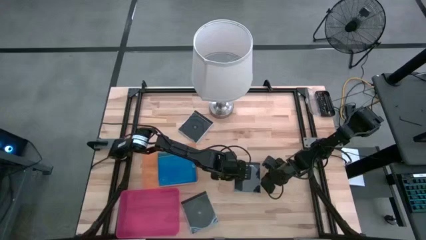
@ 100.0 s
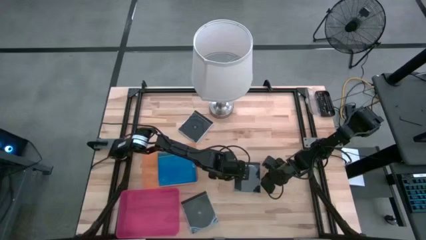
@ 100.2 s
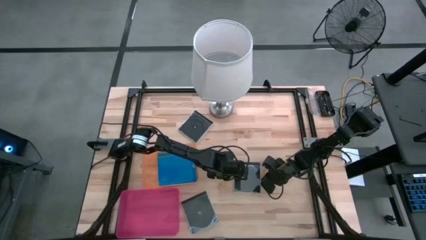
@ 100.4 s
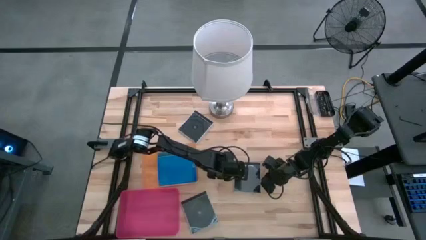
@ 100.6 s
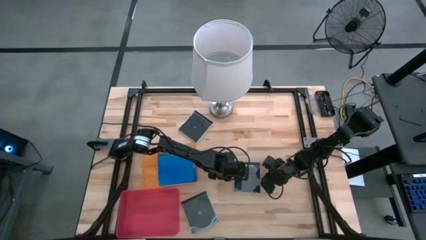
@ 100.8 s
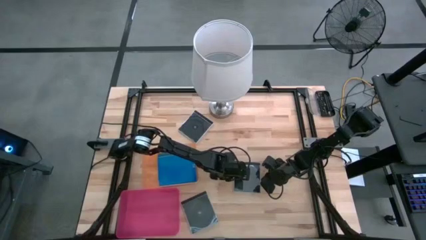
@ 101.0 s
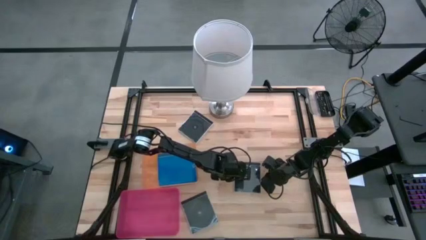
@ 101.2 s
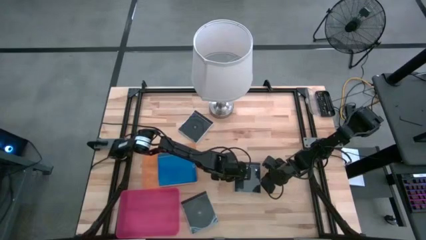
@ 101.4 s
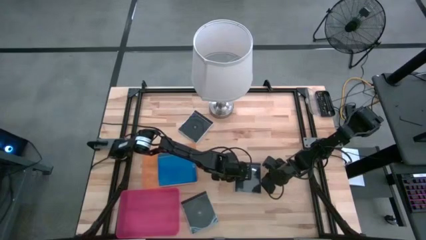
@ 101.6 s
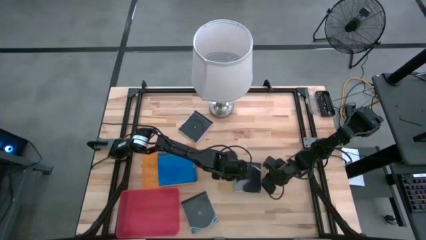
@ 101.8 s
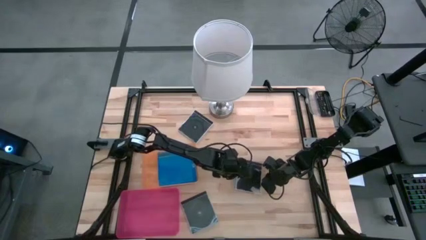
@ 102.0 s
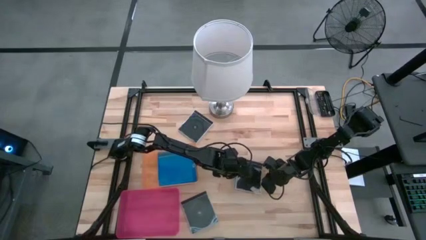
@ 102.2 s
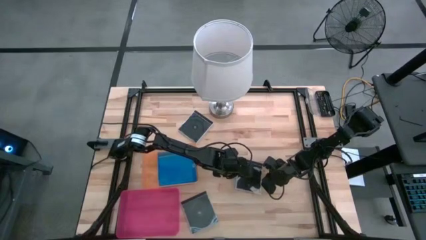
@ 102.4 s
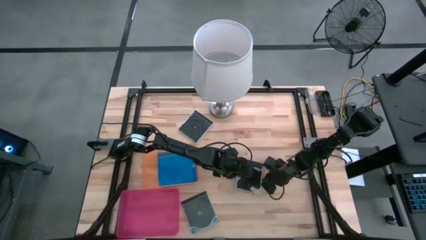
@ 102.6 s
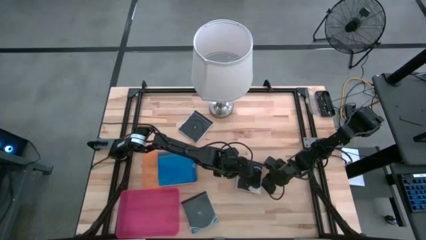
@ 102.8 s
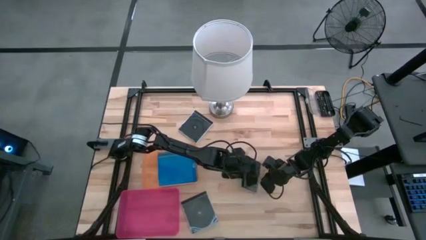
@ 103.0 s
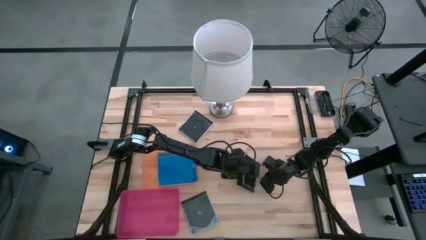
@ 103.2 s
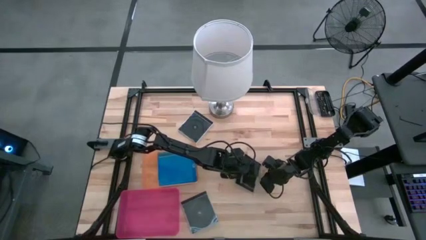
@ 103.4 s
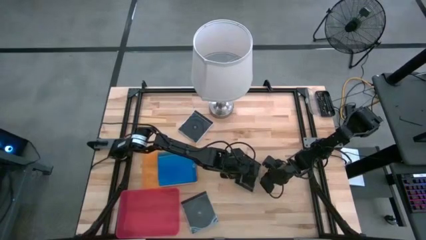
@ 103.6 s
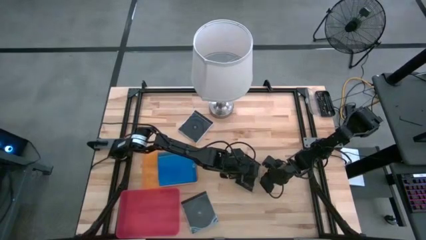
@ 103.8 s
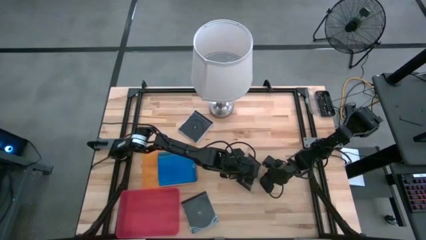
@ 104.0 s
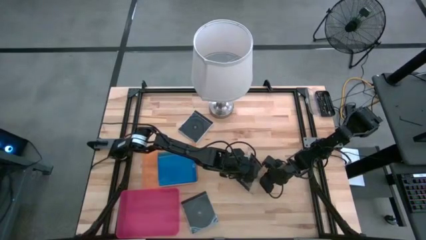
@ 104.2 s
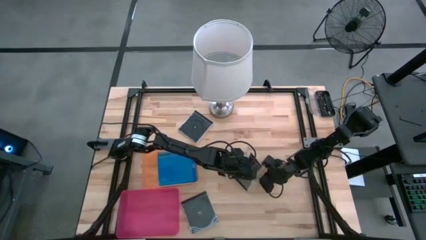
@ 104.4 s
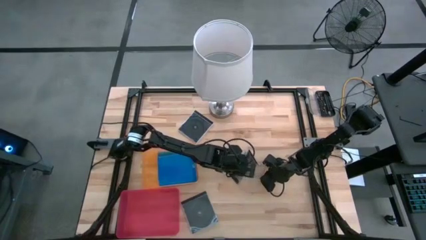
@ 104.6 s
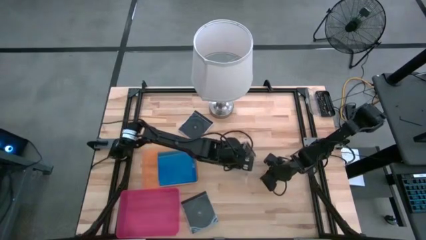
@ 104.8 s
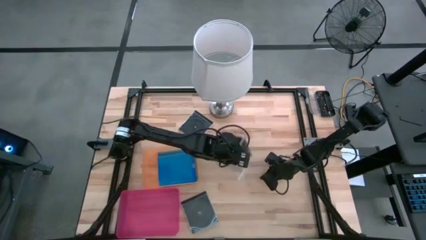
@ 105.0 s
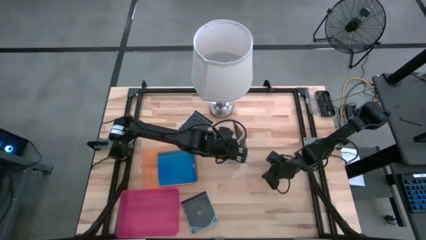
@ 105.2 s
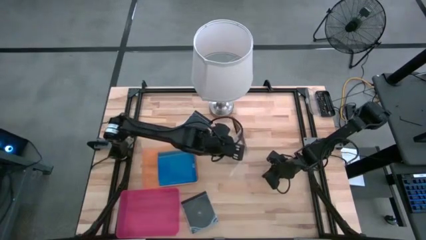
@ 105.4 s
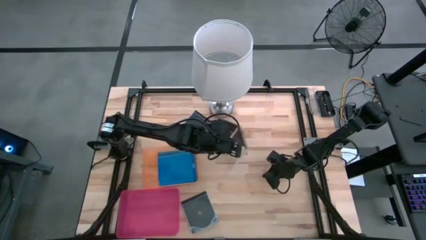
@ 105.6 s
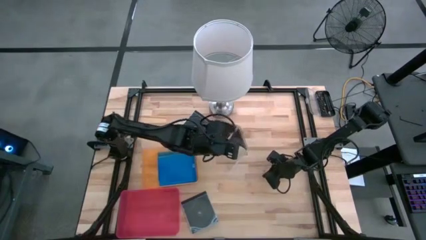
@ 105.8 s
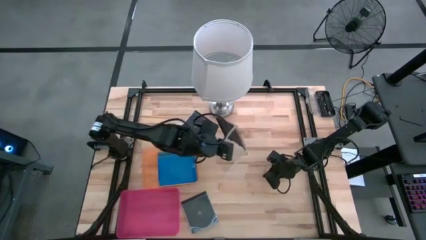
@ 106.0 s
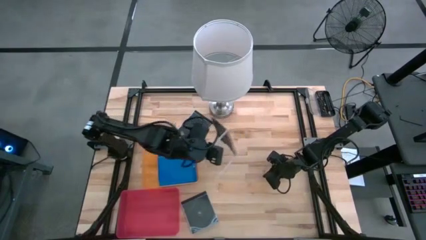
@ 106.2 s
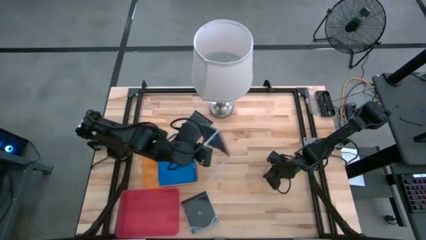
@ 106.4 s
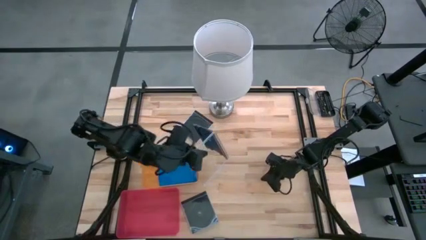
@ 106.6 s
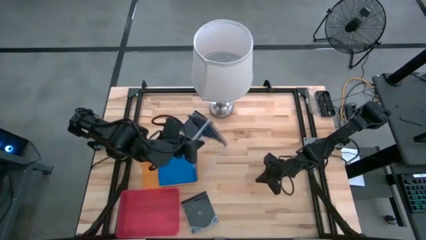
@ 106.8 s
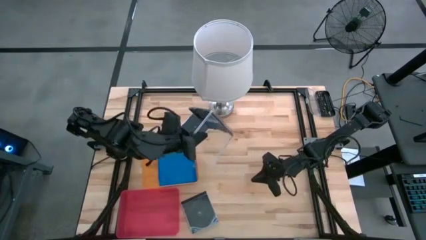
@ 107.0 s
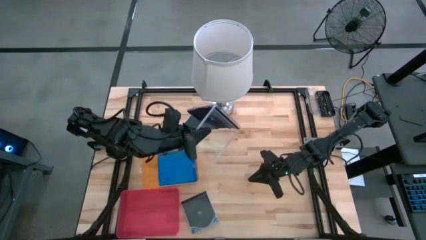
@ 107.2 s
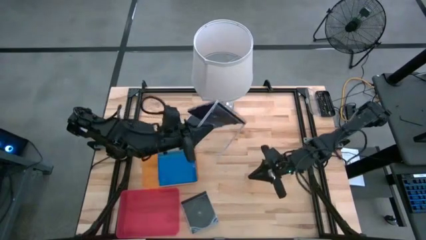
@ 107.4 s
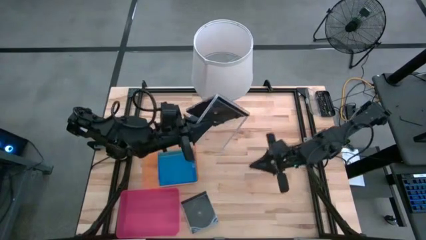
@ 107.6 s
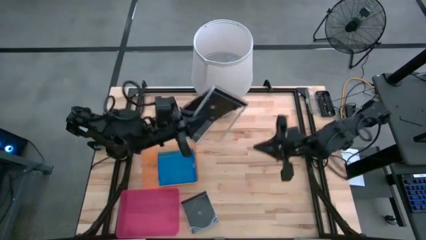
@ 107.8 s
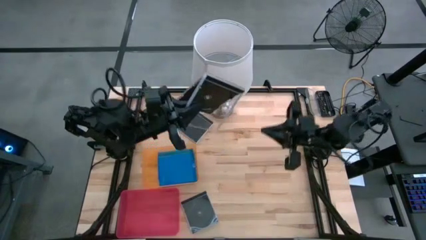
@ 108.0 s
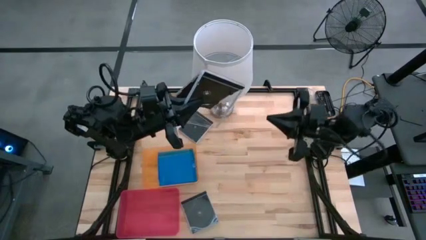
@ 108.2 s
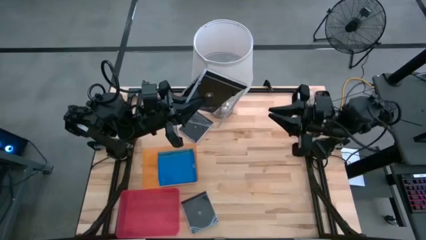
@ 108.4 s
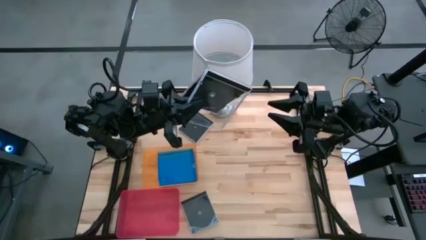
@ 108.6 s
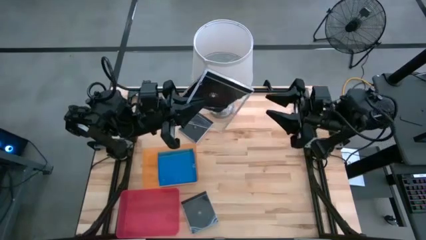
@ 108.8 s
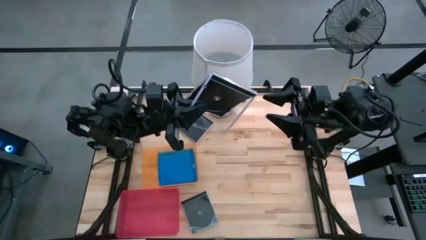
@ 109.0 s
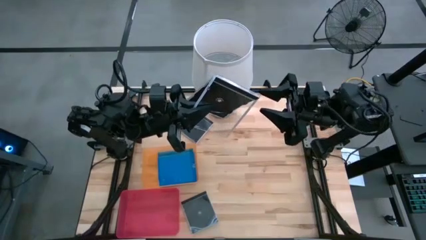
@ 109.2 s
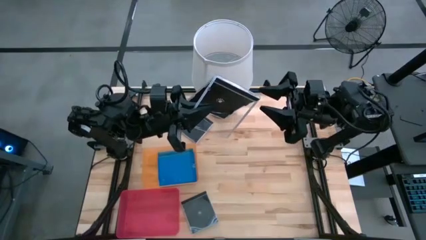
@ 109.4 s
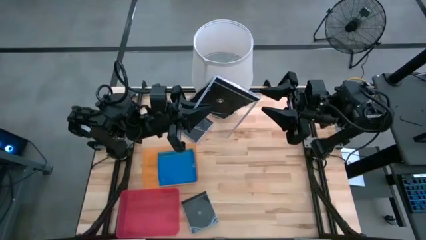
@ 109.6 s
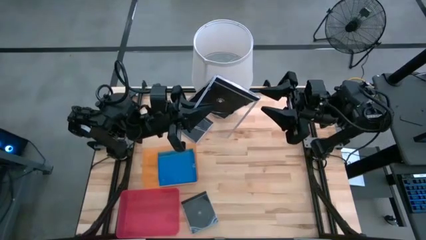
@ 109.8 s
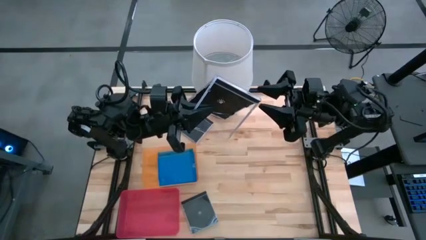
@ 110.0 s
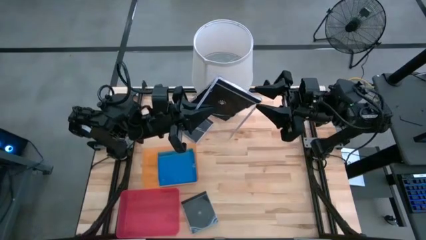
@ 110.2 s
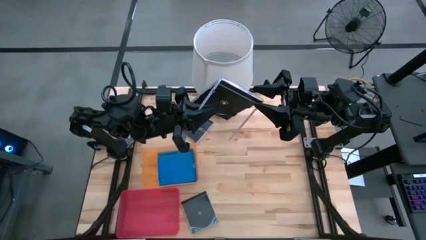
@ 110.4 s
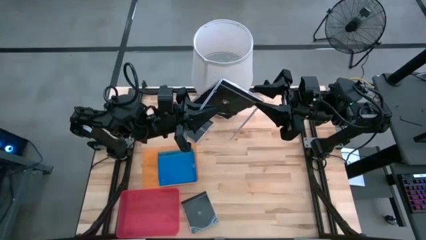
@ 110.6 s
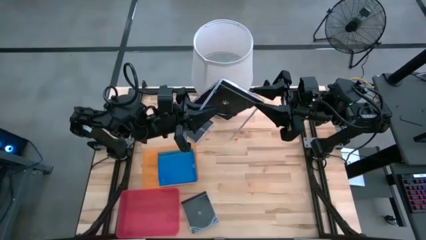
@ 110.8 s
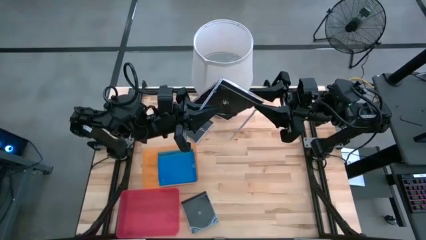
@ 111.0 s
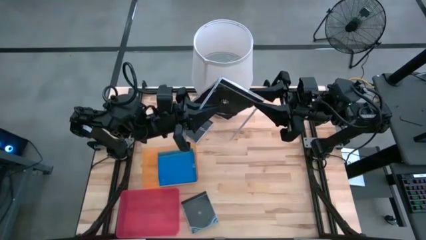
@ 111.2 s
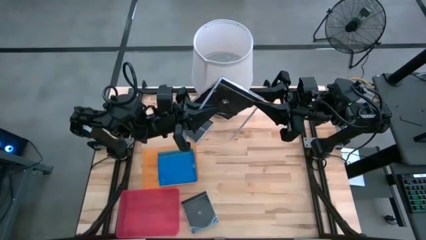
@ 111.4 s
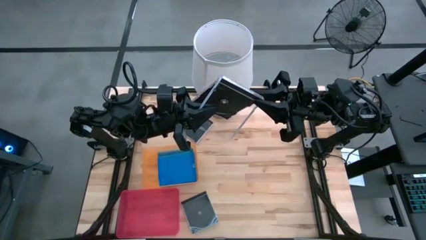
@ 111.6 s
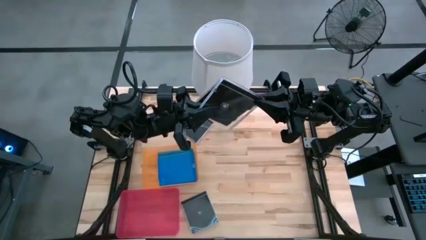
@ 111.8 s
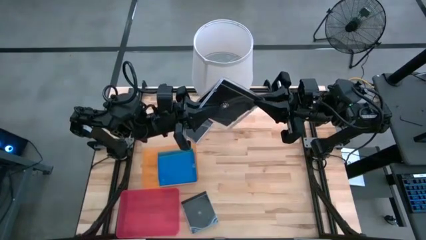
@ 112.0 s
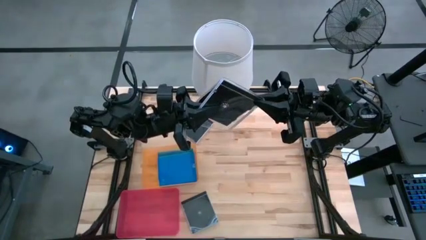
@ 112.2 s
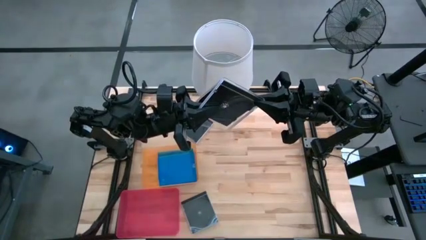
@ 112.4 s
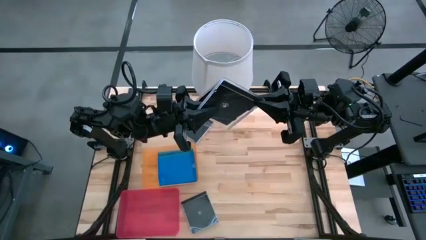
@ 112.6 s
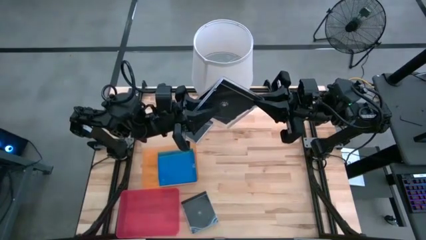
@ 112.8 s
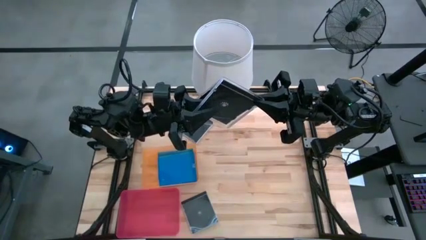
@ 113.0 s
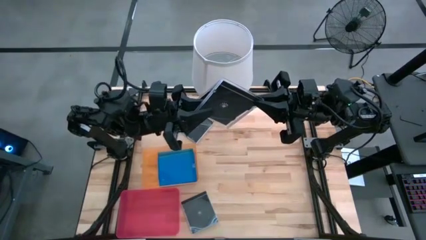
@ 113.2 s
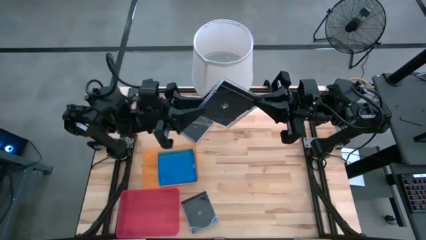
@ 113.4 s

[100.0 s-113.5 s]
Task: Pick & place jewel cases by type
Put the middle black cd case into the pink bin

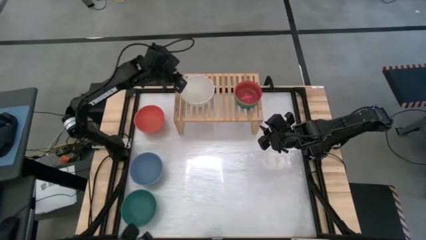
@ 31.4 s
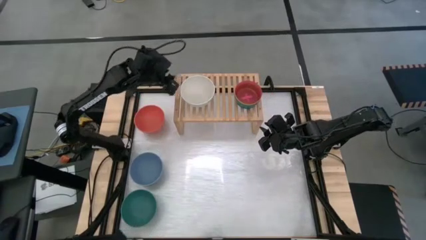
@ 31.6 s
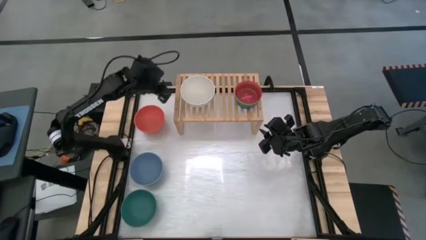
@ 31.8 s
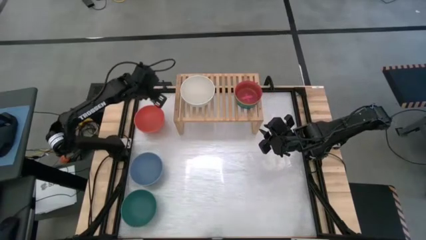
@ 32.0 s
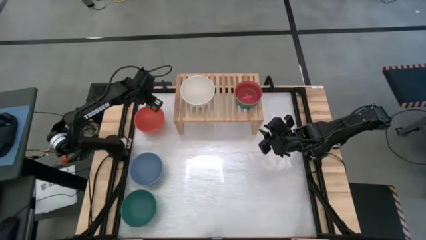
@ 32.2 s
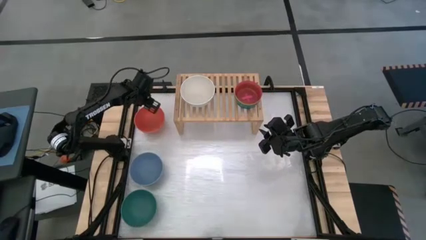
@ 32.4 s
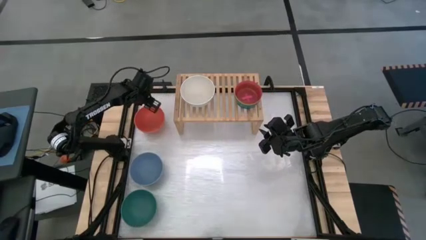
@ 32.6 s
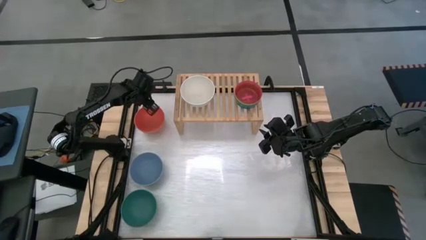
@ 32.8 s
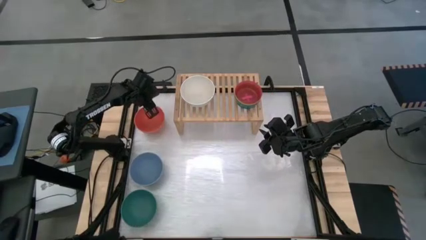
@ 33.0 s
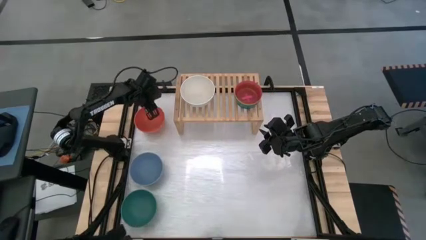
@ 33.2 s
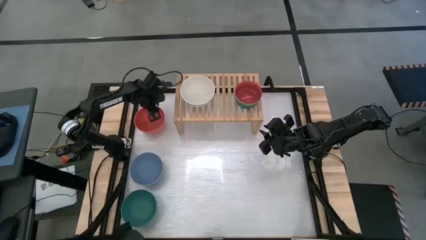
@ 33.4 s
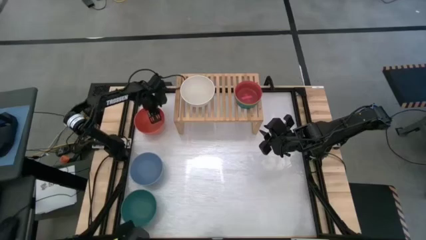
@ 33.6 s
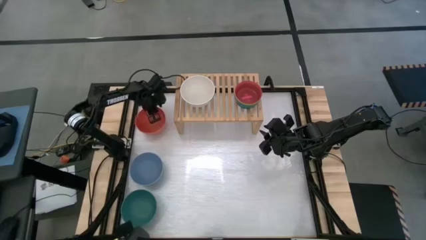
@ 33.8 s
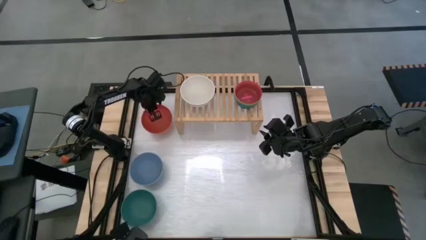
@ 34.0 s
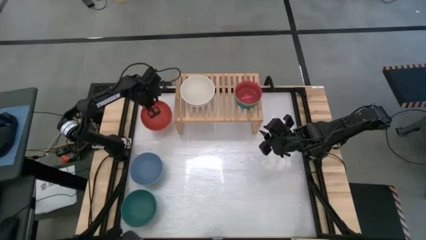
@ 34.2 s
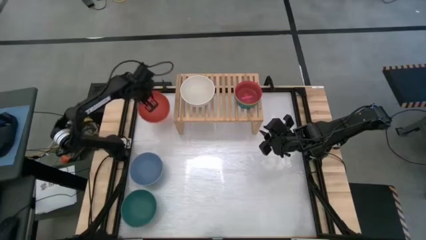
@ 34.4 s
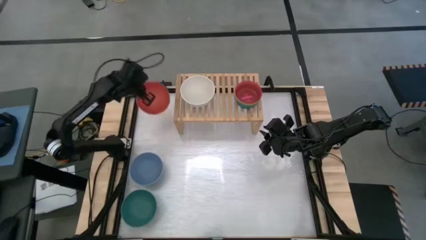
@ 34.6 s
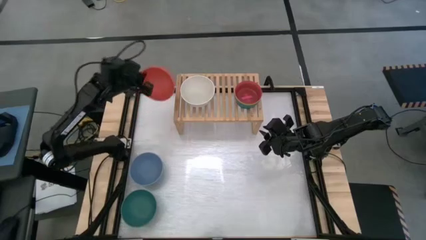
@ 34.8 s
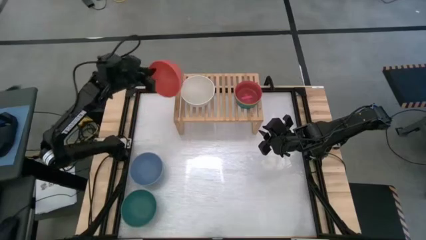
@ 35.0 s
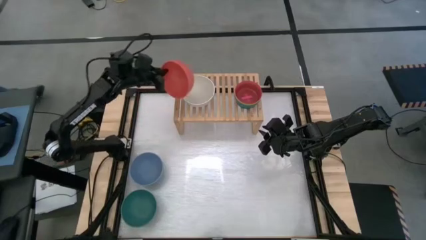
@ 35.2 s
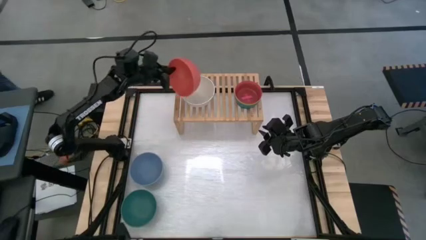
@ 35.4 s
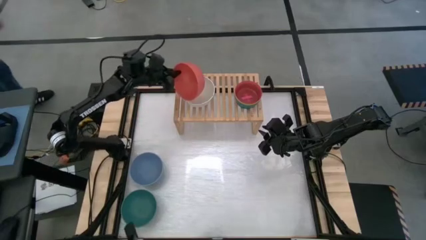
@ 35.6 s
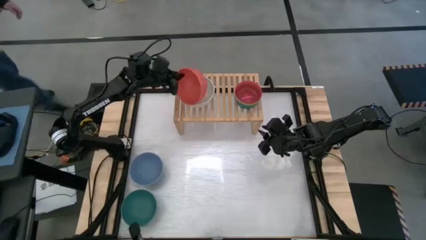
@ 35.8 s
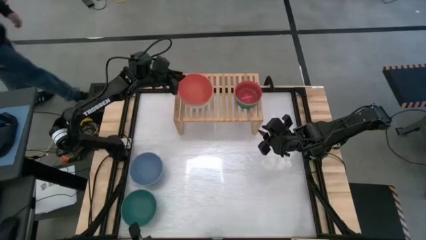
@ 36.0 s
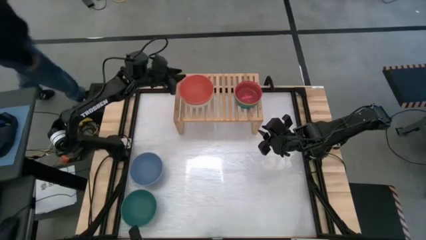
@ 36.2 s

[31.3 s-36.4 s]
Task: Place and stack bowls onto a shelf
Stack the orange bowl on top of the white bowl
